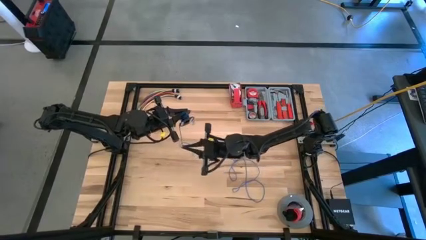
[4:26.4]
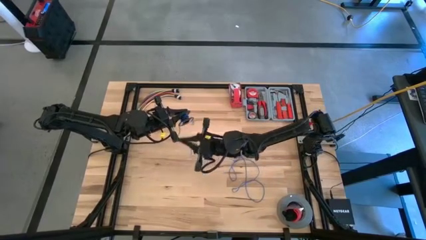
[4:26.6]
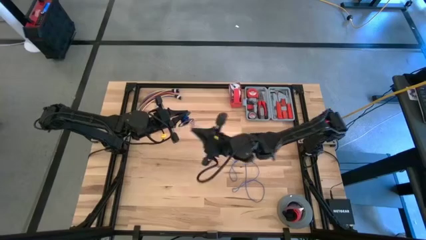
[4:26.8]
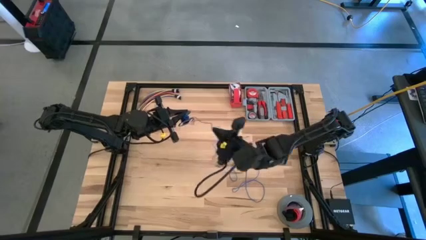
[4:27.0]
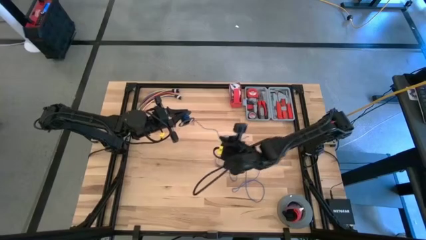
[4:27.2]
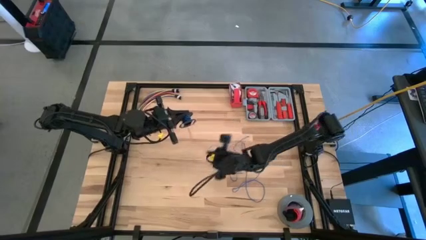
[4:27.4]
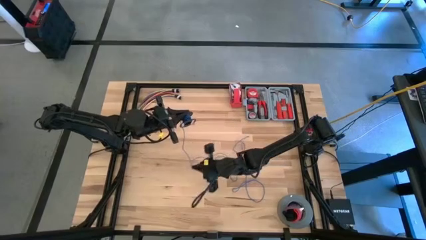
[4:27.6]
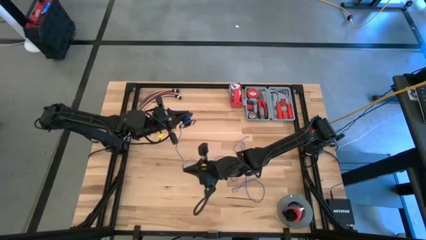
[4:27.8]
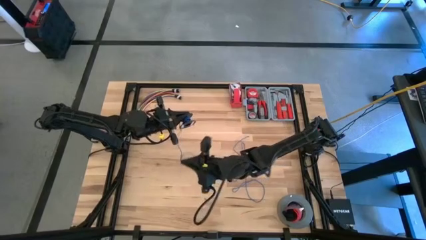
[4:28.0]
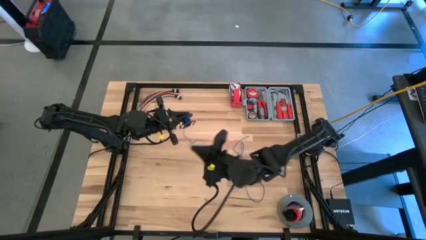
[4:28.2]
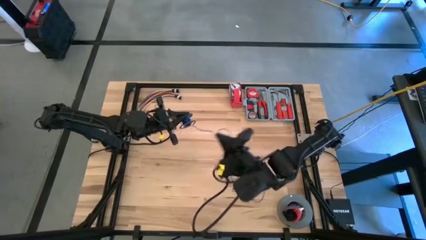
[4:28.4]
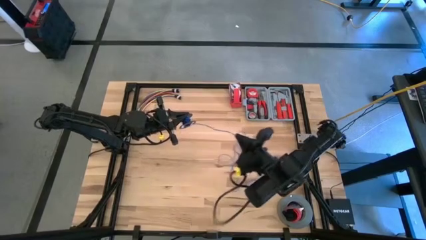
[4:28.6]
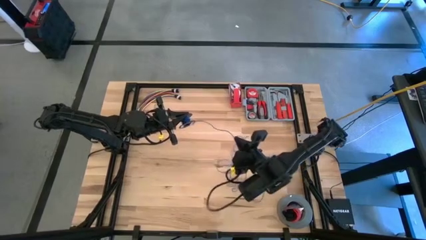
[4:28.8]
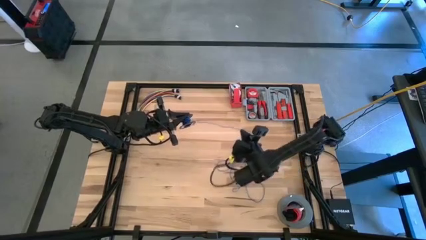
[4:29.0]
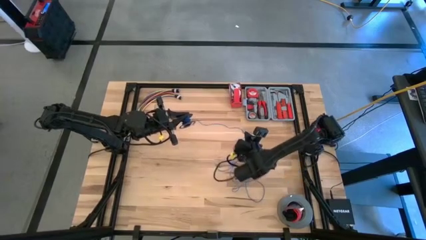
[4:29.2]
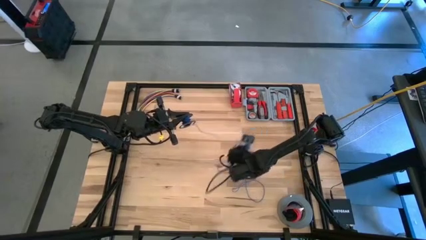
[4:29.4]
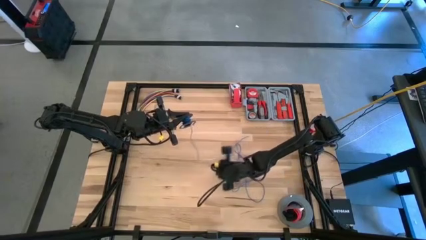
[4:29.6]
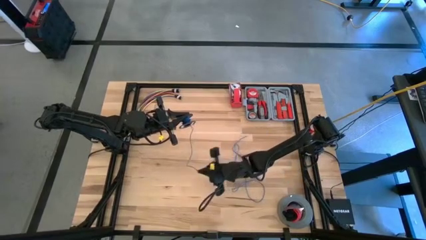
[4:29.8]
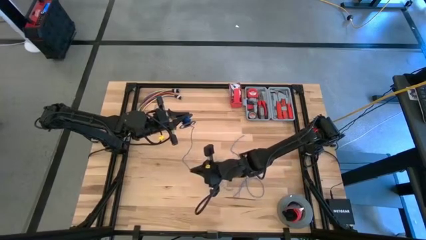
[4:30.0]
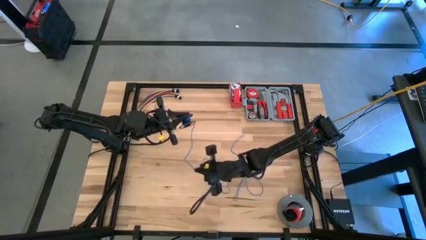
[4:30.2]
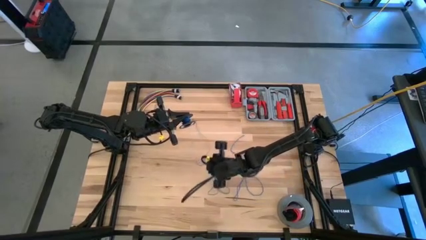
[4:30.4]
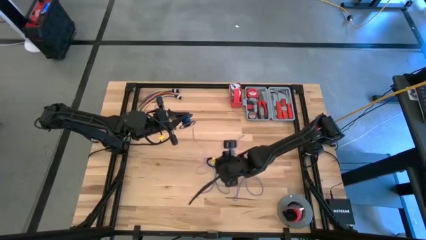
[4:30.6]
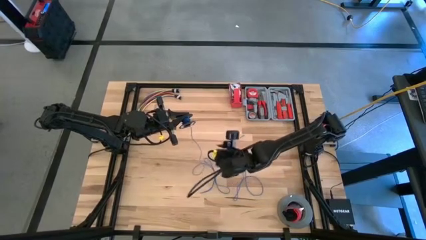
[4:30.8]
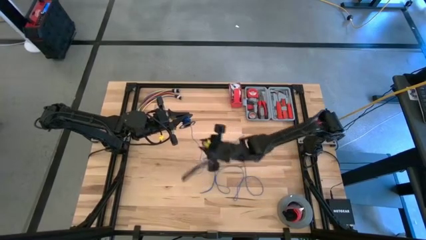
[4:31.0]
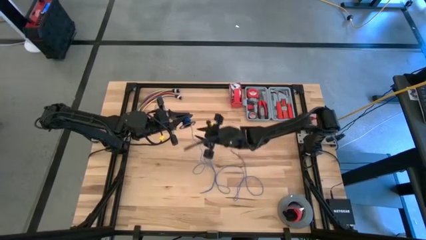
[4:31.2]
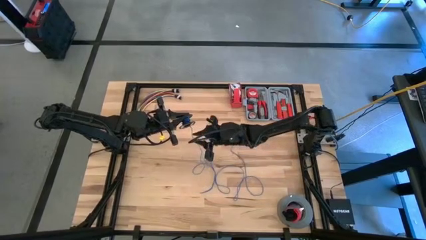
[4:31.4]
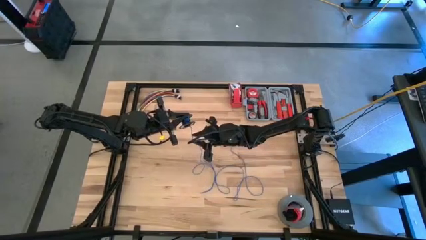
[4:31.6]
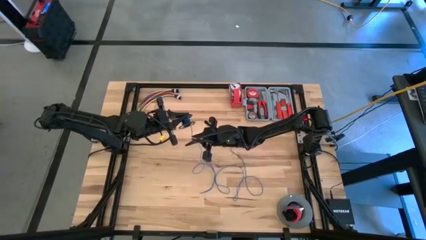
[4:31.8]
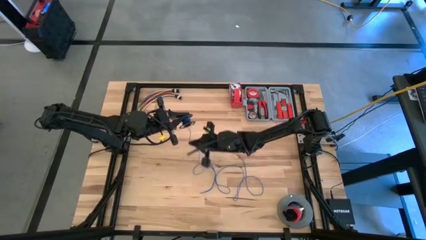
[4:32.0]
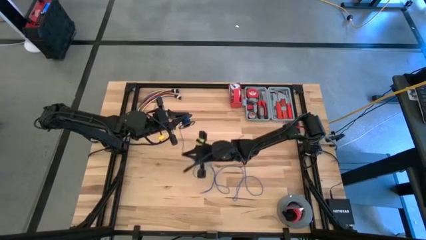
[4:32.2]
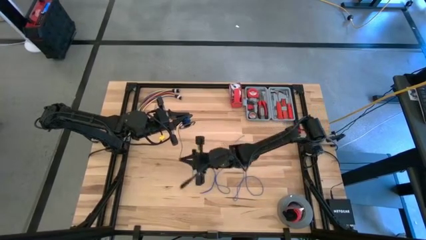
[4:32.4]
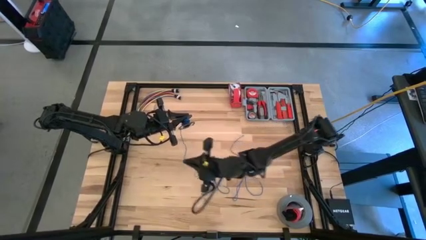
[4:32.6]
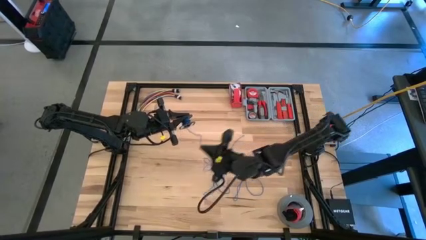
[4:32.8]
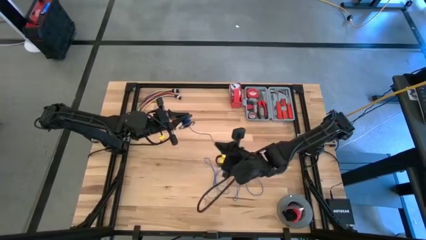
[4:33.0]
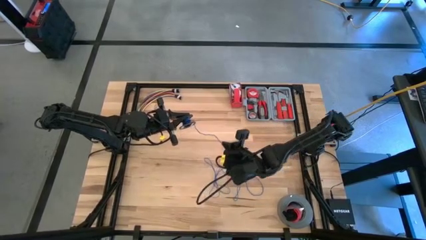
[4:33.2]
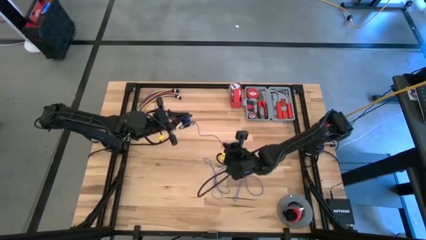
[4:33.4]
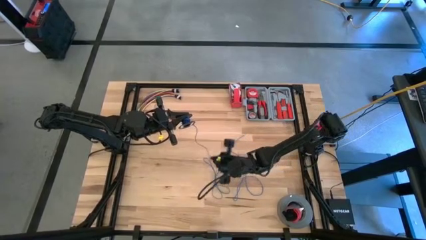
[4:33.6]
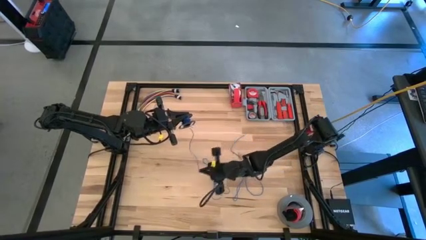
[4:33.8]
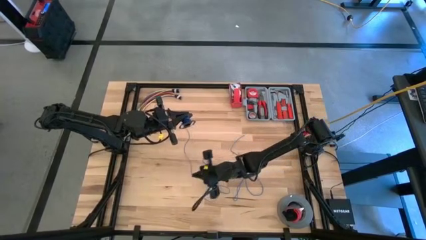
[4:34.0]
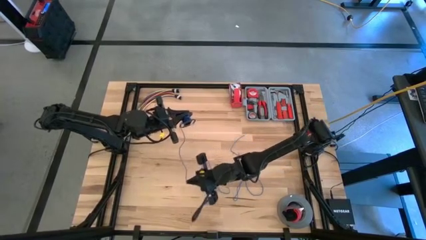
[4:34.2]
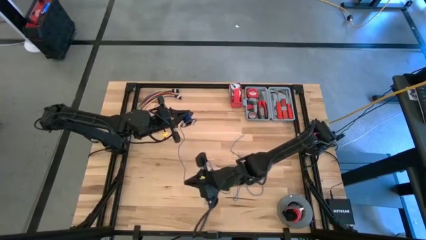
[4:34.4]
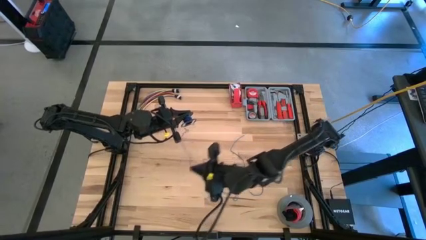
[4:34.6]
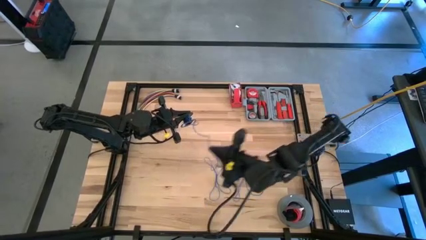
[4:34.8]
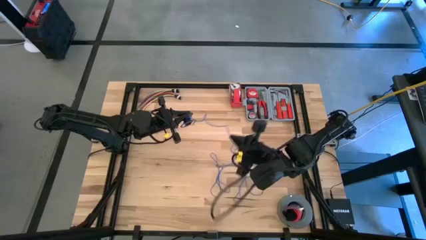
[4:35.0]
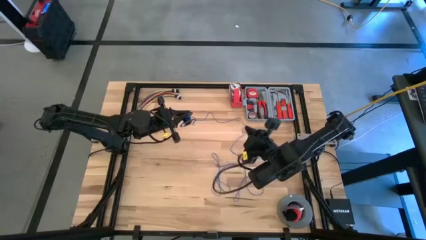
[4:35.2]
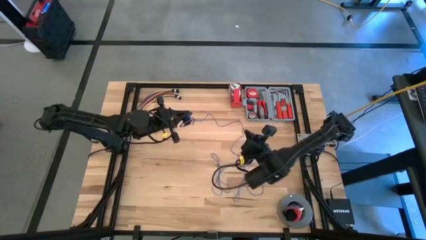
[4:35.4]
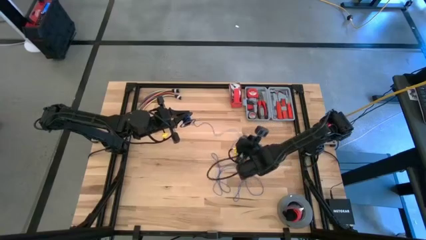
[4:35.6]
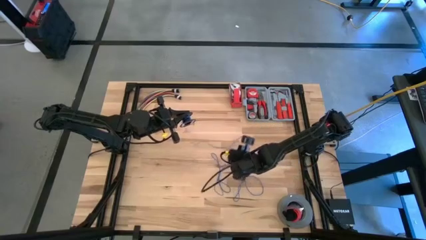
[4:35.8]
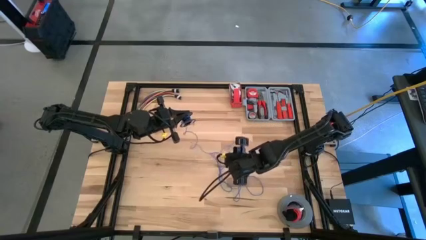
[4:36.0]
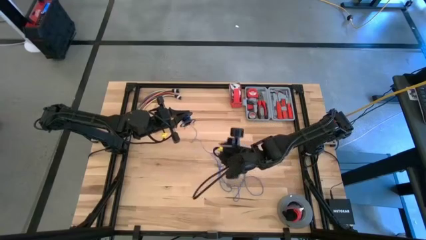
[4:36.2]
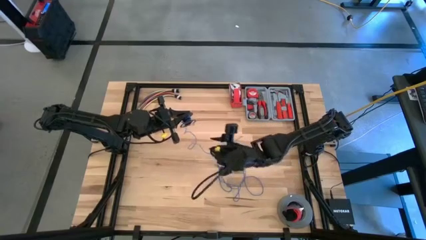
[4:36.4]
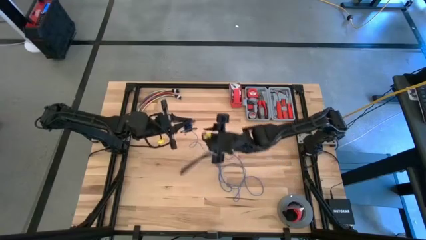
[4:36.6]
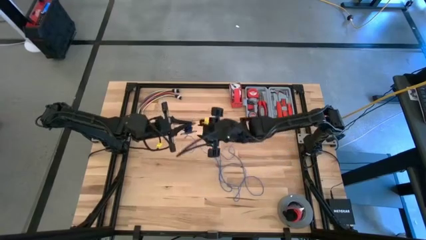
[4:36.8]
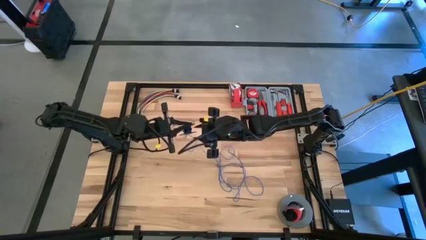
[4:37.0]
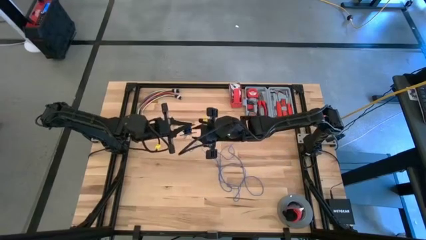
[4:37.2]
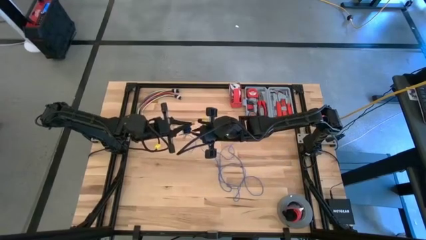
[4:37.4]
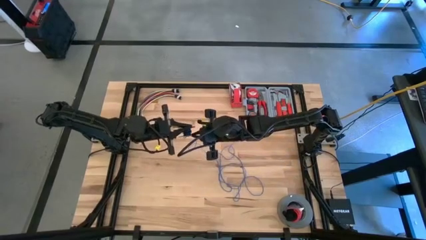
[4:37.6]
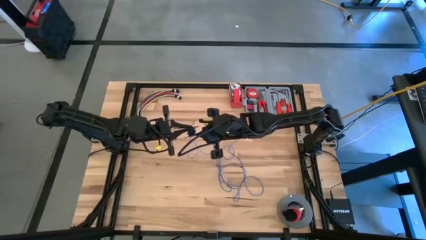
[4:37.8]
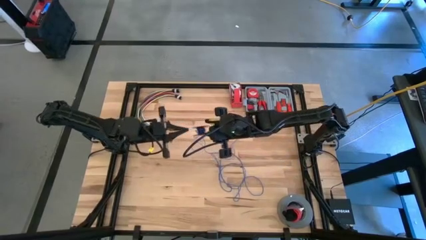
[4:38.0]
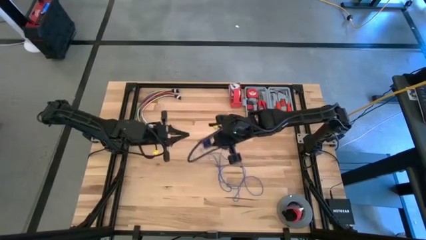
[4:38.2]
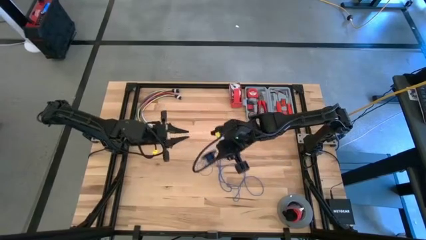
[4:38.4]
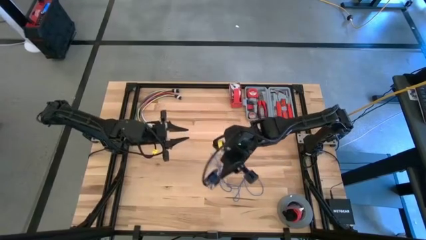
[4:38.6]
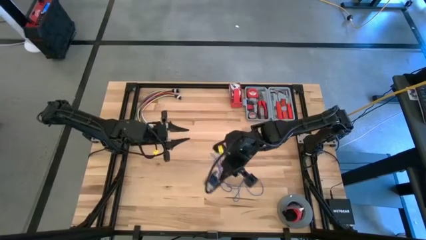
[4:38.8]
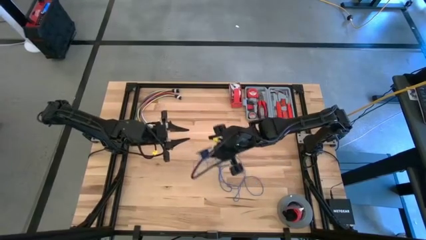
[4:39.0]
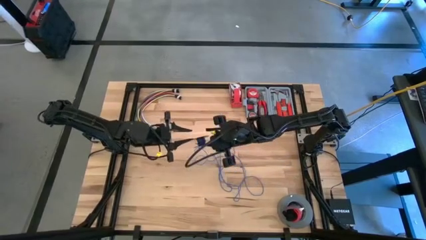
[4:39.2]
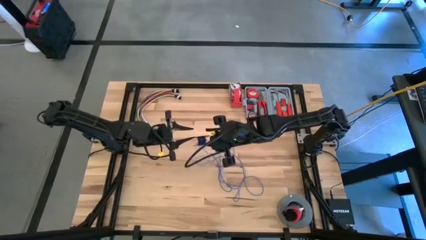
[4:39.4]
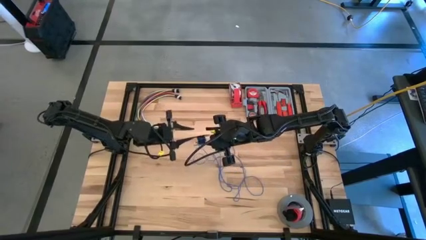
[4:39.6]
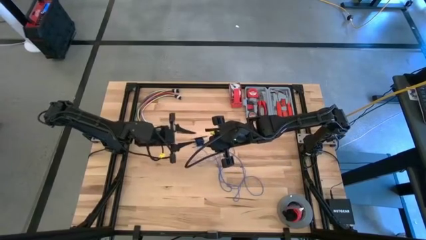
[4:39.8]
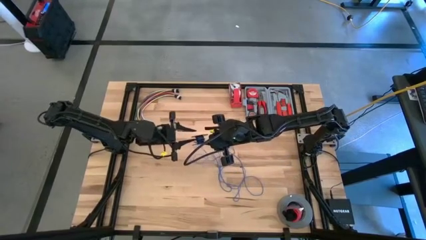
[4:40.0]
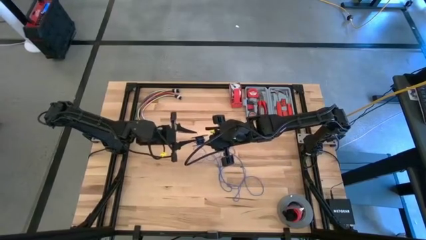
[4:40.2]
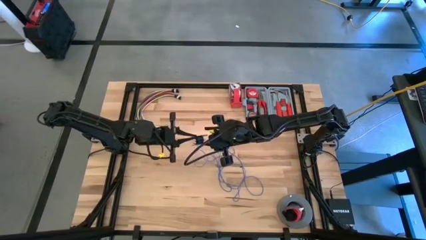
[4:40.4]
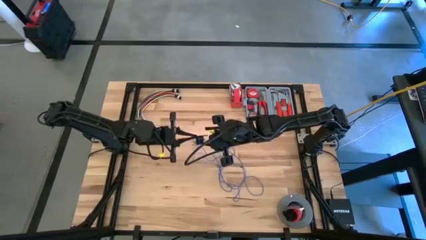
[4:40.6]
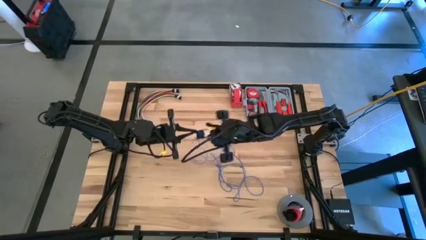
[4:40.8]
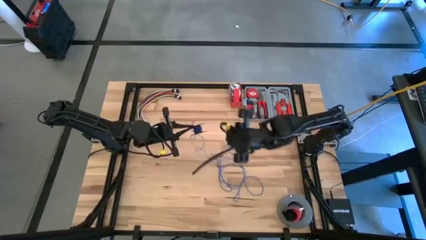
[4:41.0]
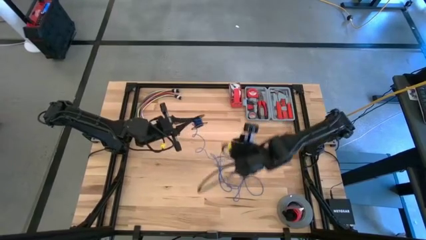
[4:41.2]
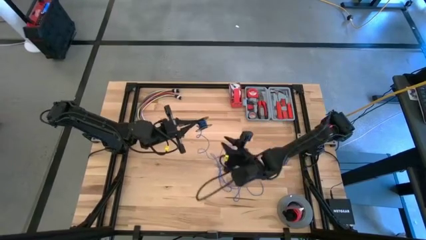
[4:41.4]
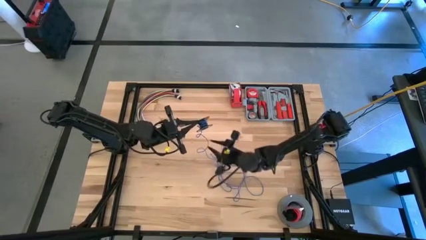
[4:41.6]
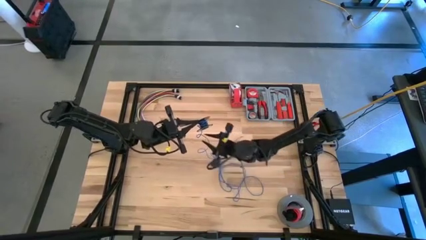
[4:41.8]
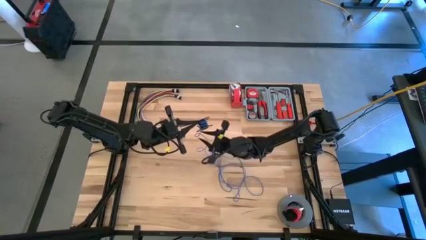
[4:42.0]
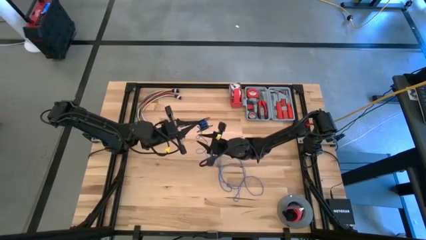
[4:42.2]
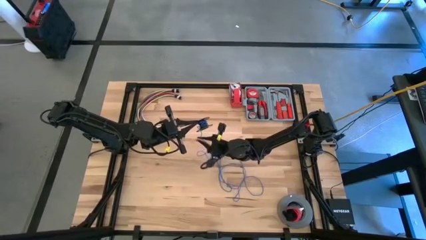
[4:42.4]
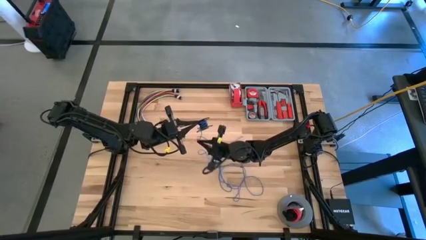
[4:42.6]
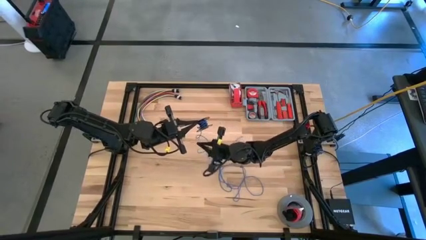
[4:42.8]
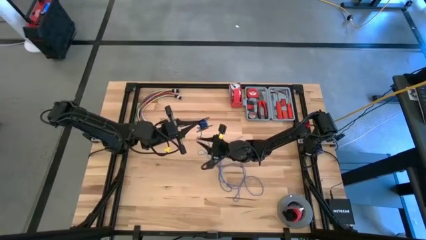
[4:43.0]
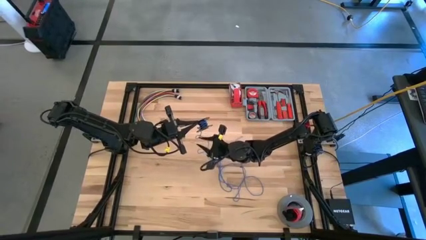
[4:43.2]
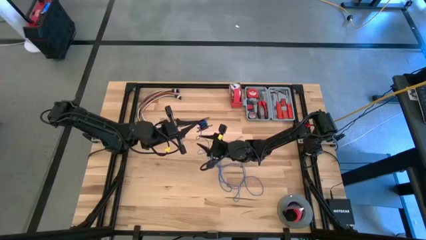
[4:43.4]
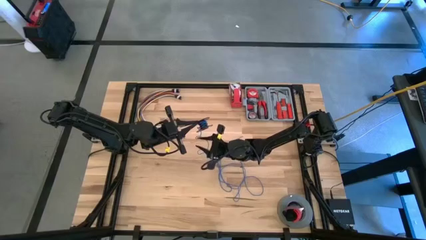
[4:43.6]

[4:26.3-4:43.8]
Task: Coil cords
Uncoil the blue wire from the black spool
